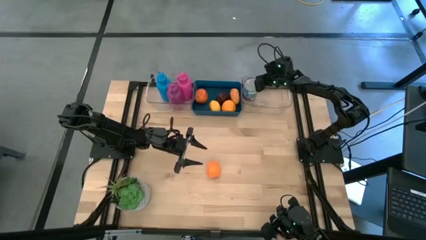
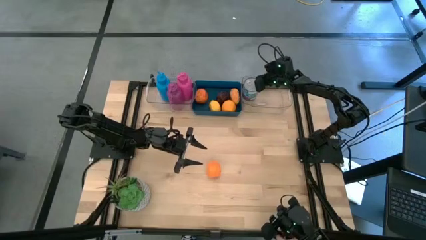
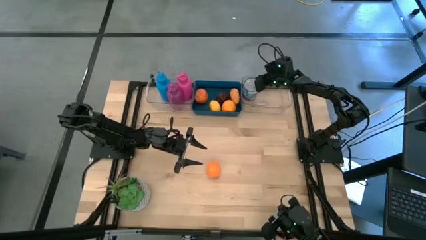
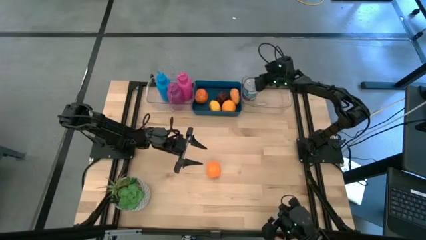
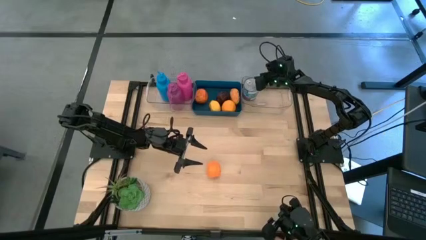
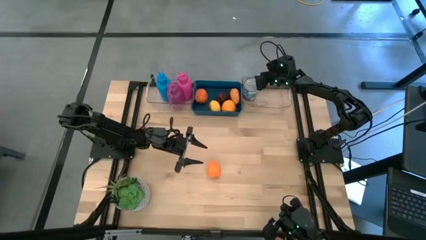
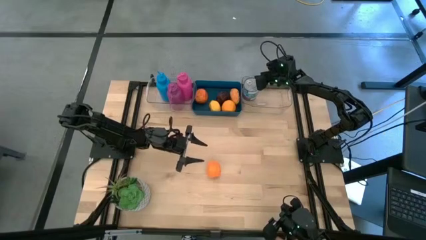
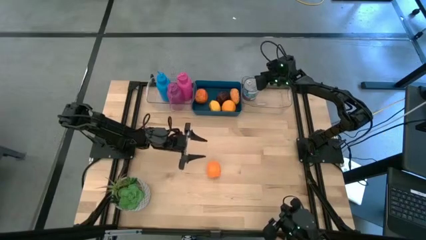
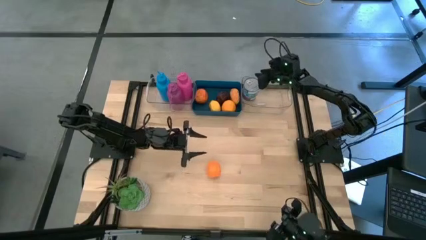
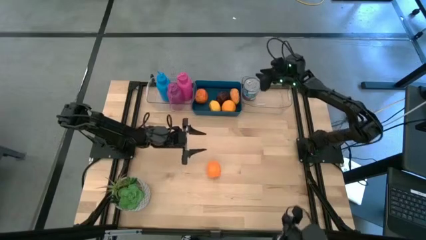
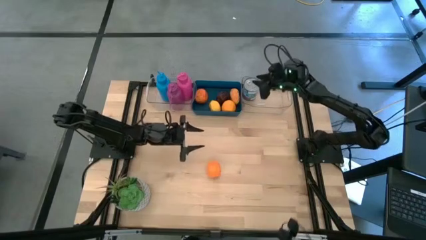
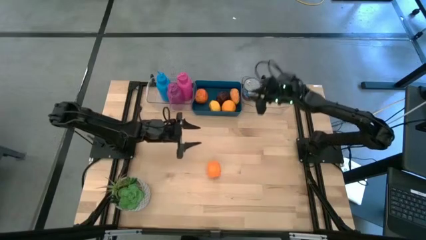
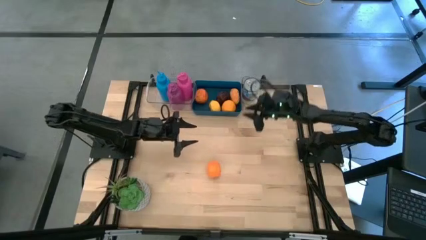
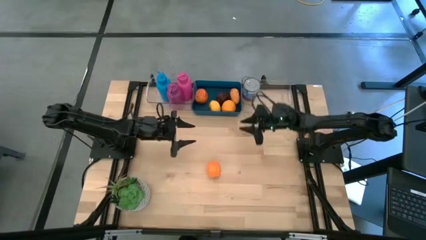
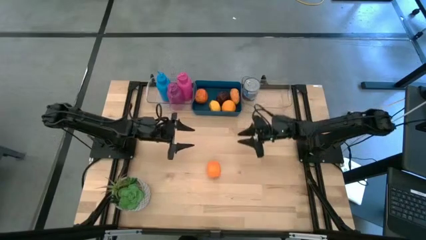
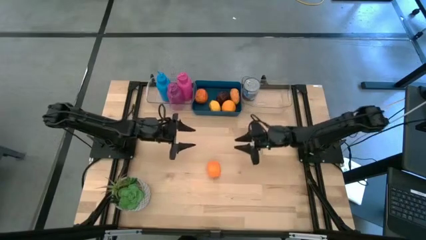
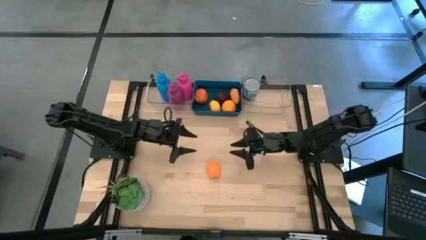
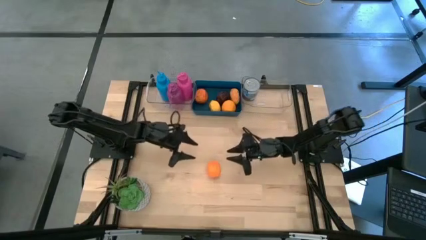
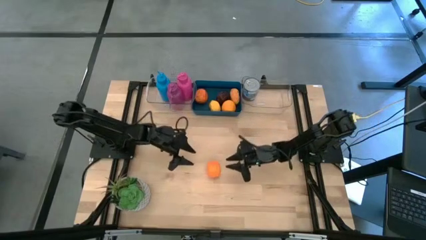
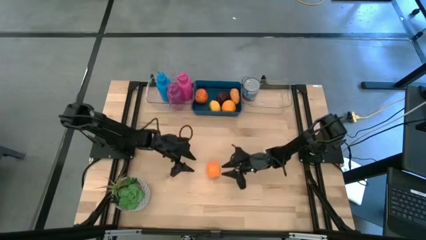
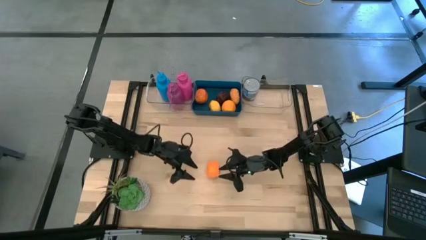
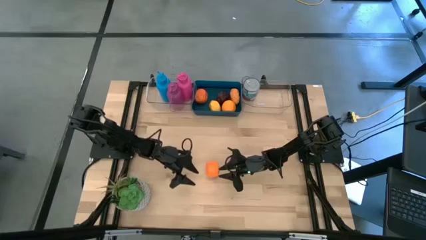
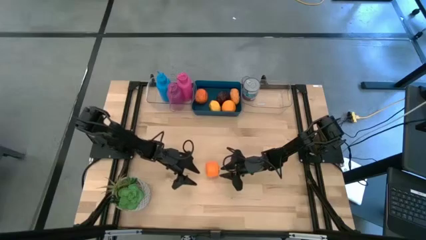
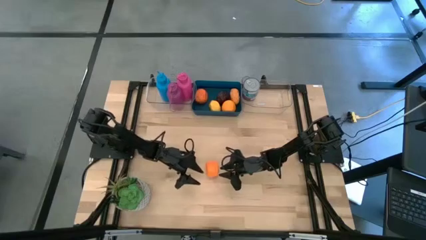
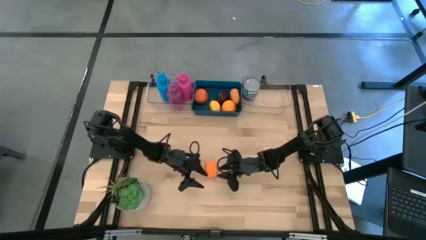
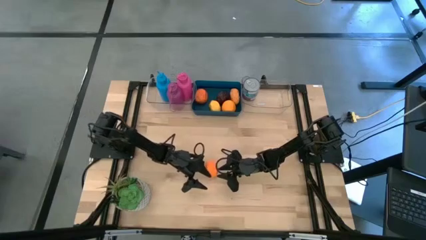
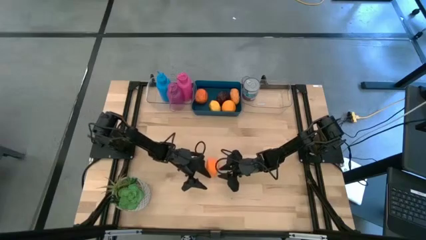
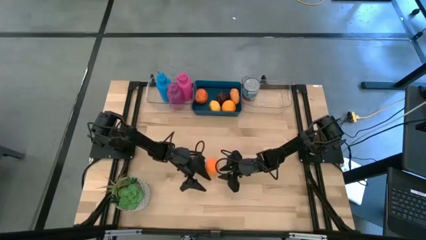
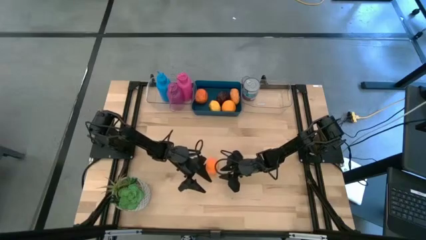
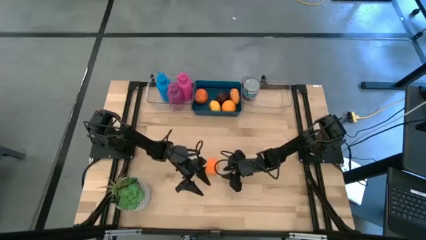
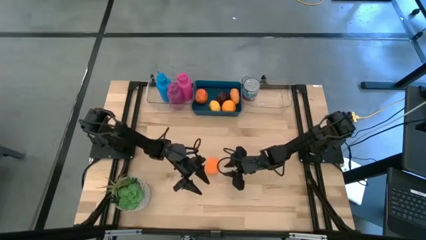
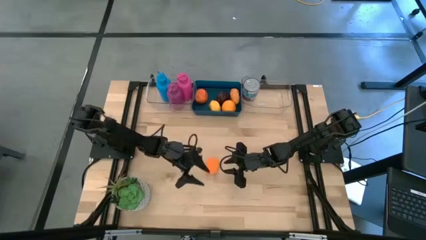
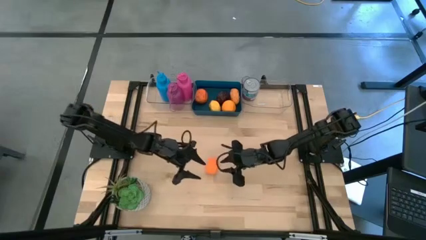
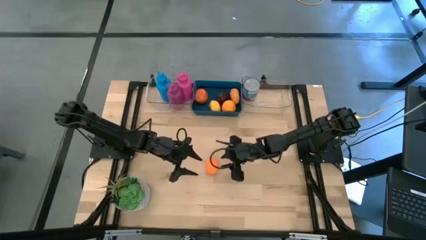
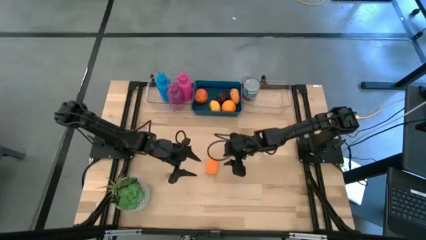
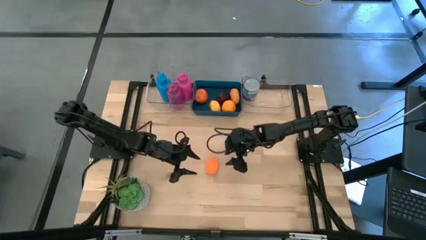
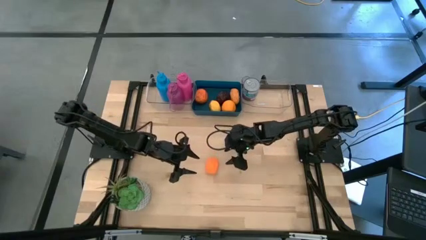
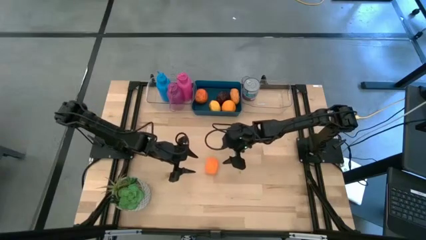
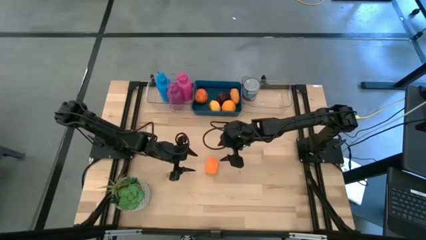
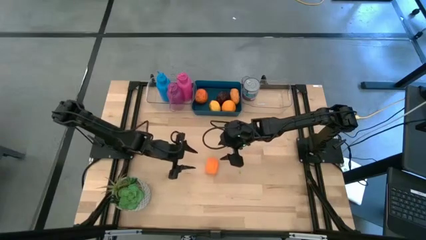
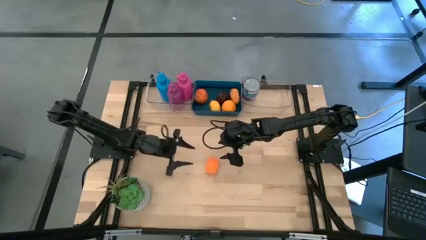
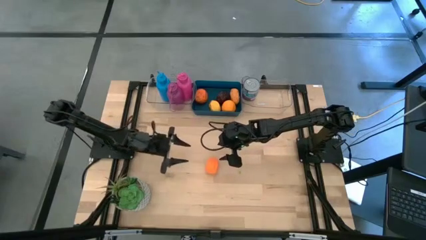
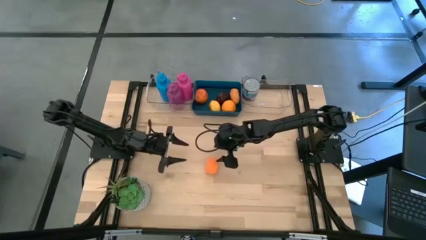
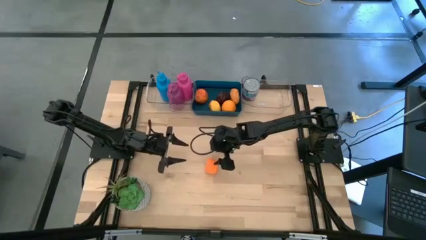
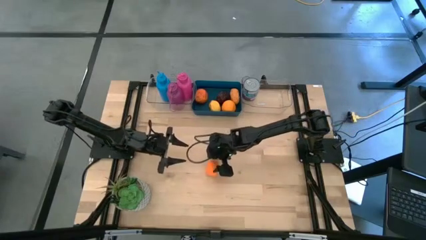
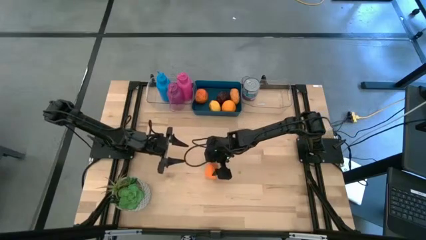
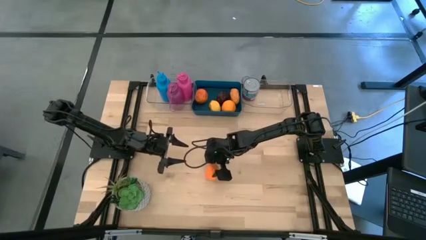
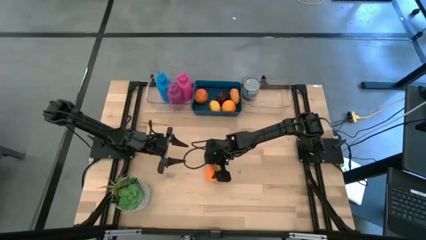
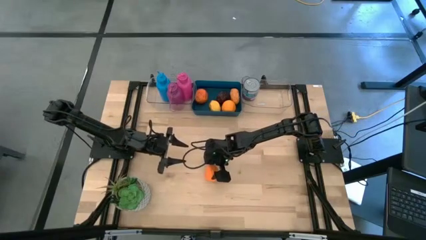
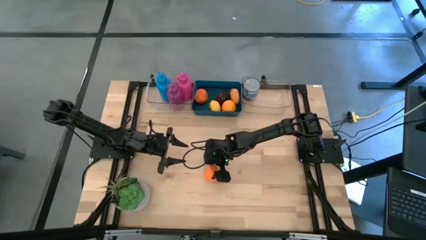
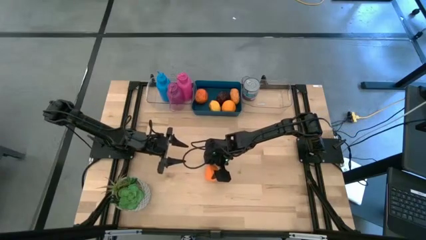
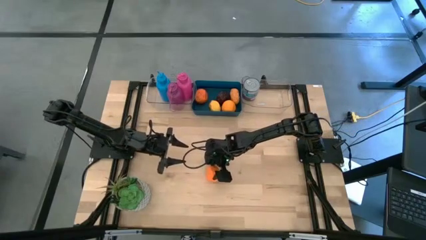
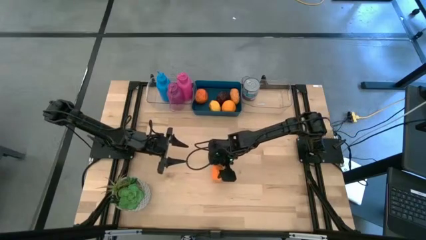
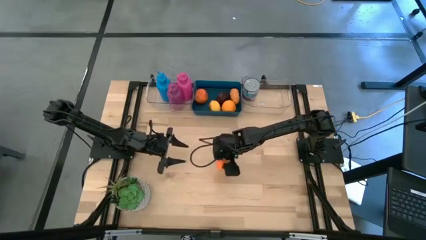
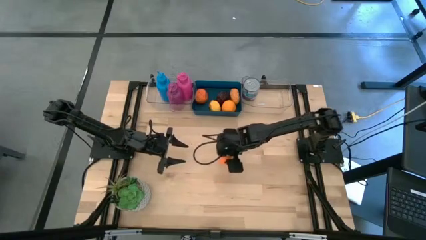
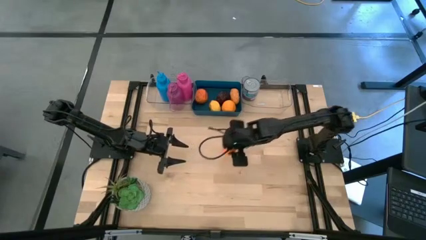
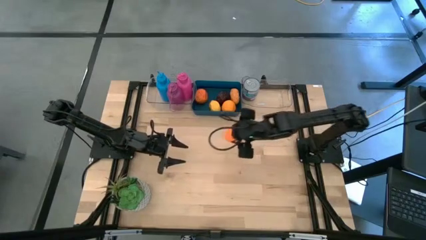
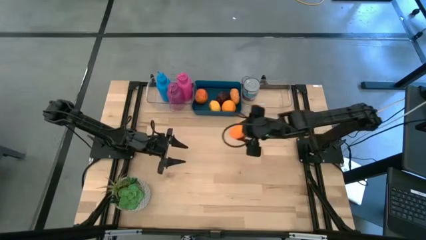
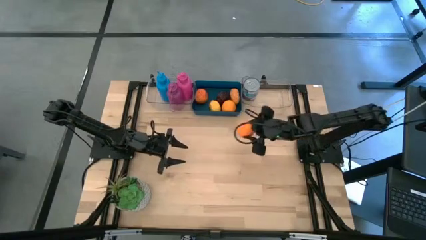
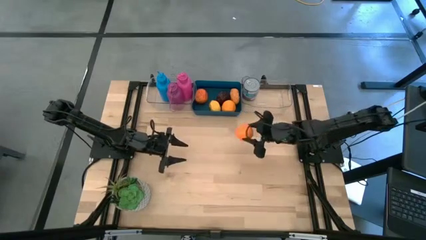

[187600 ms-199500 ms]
Task: Pick & Place Food Item
Put the orange into the blue bin
